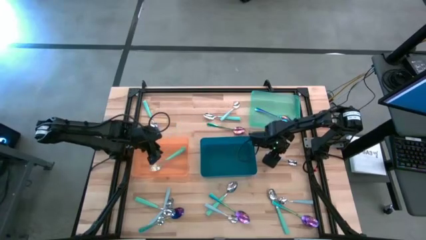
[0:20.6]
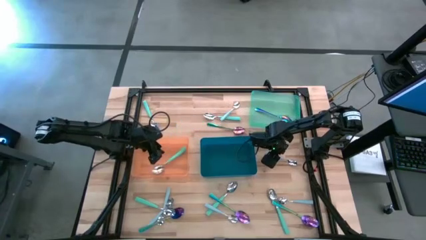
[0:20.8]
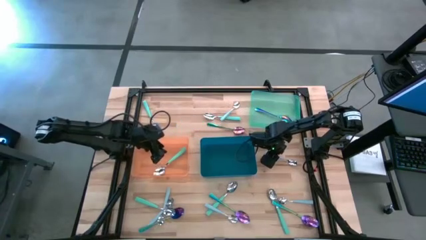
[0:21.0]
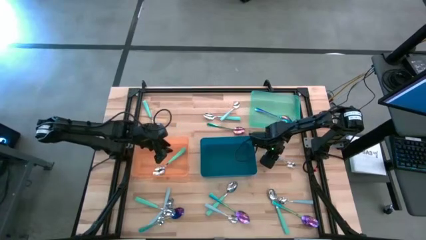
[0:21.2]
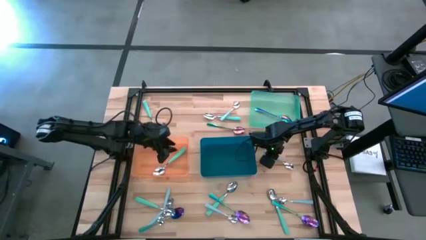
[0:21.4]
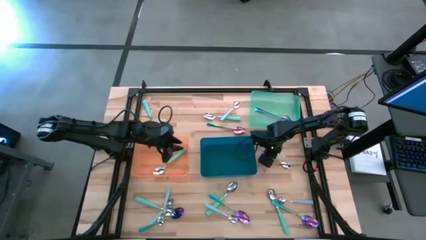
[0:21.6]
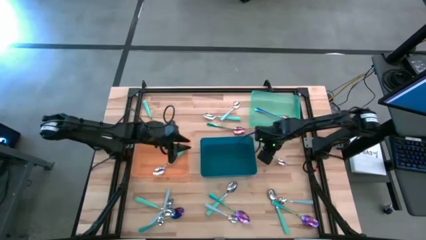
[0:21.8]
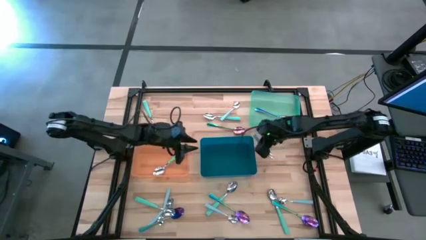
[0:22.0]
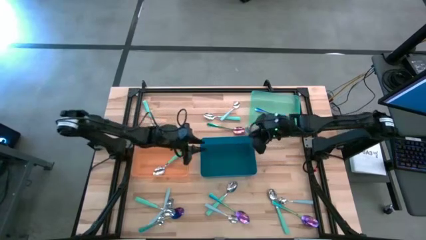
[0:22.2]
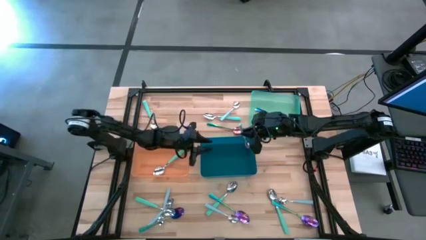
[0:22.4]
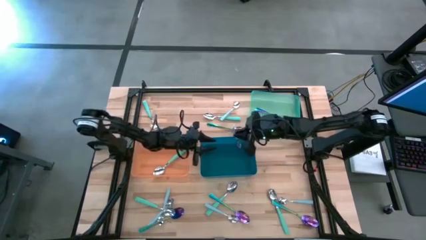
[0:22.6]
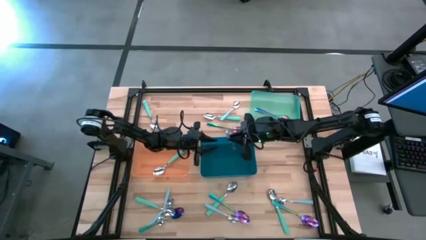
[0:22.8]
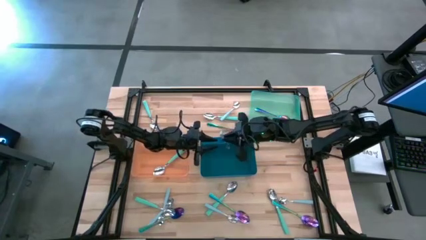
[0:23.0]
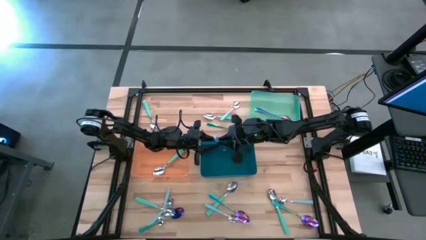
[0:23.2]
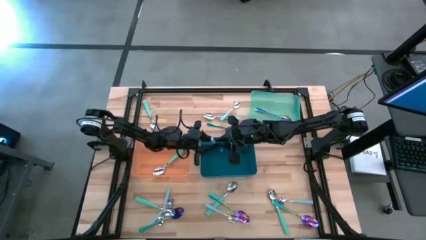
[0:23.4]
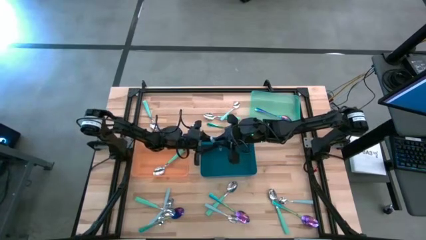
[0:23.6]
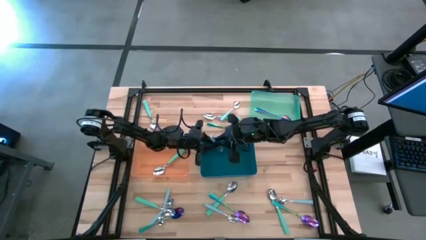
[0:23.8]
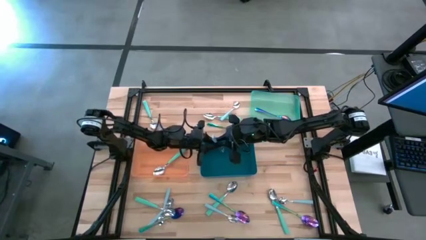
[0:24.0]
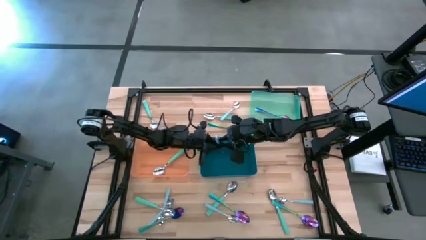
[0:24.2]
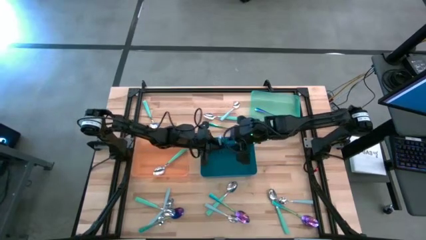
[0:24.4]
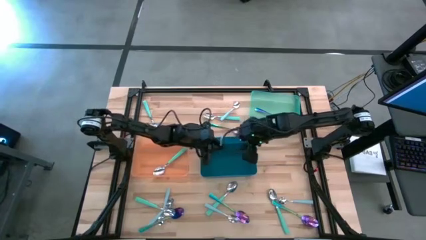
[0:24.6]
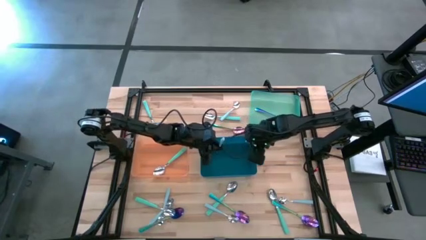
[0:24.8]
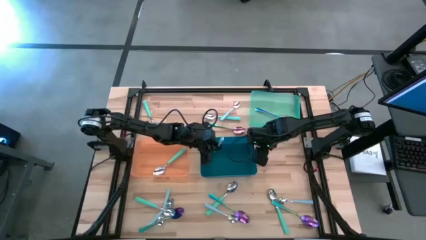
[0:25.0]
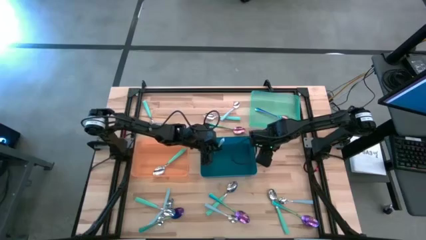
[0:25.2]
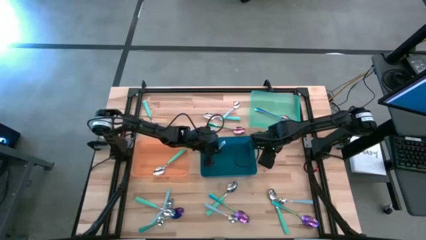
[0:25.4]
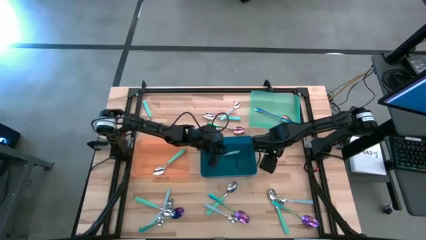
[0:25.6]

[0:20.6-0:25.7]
Task: Sort silverware by color (type)
Put the light blue spoon into the blue bin

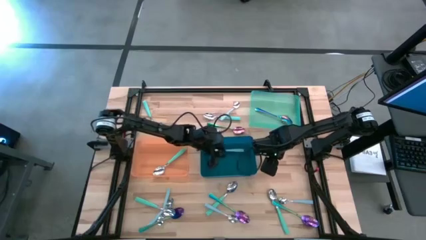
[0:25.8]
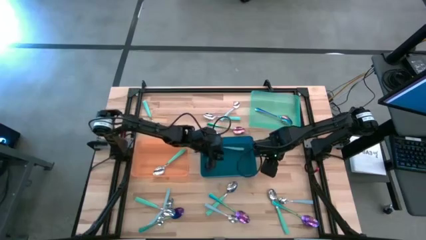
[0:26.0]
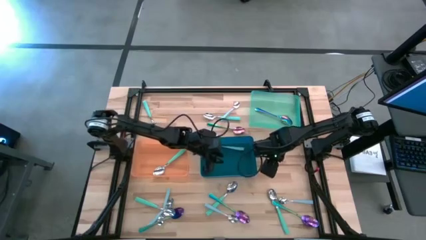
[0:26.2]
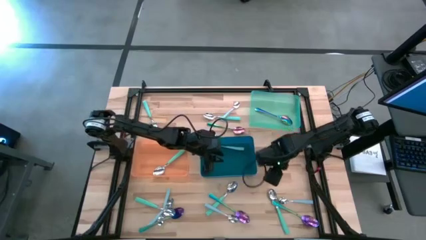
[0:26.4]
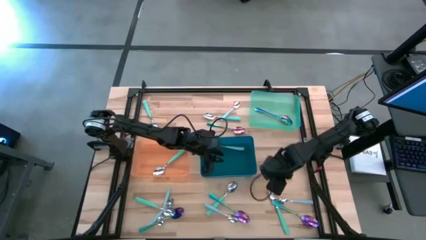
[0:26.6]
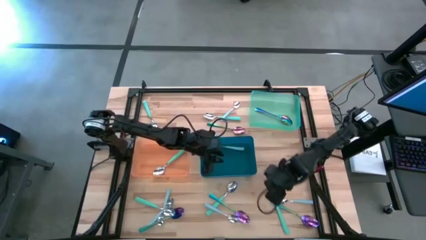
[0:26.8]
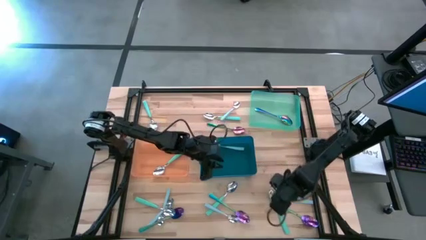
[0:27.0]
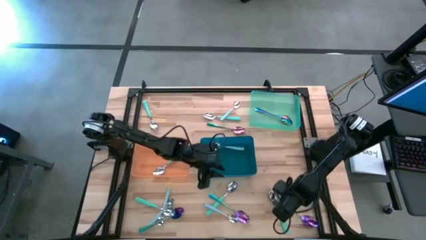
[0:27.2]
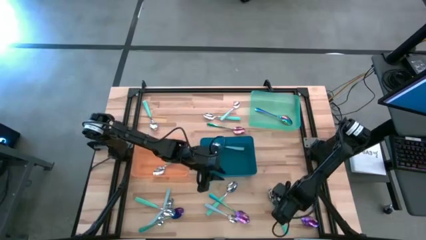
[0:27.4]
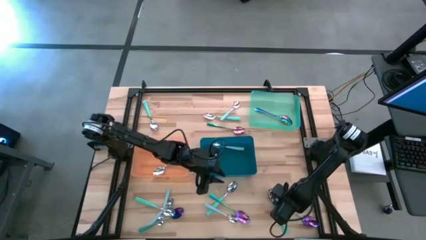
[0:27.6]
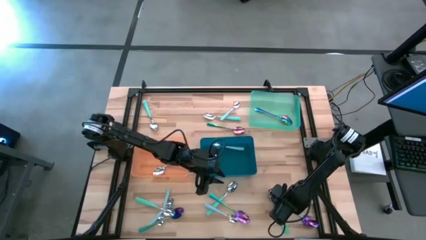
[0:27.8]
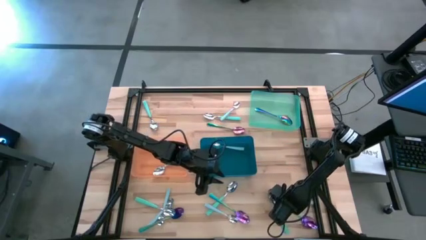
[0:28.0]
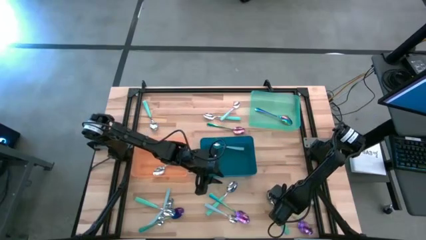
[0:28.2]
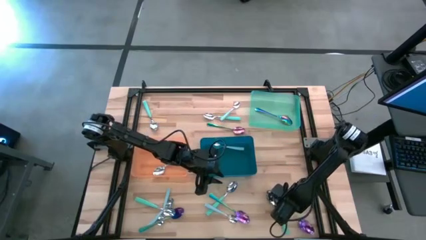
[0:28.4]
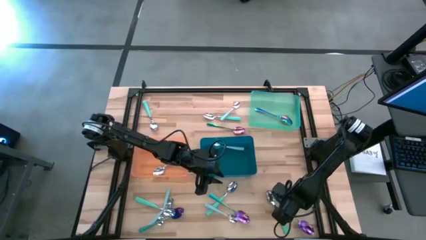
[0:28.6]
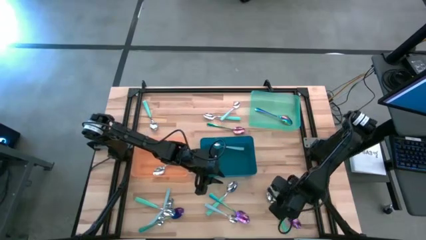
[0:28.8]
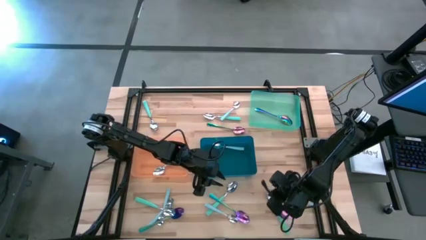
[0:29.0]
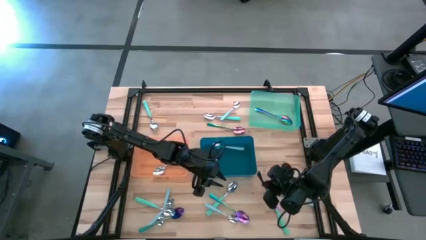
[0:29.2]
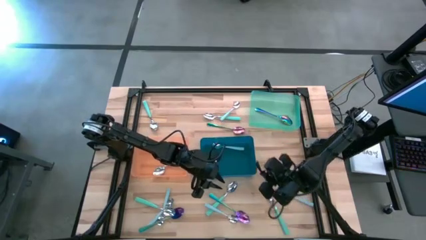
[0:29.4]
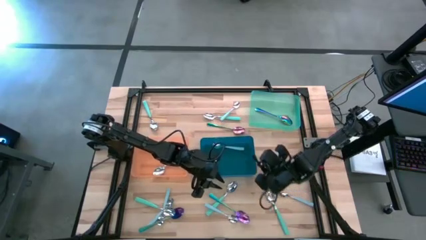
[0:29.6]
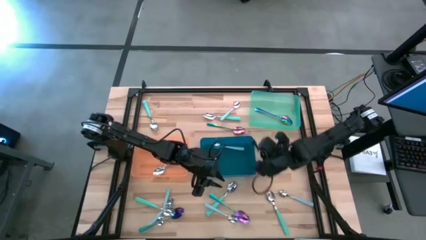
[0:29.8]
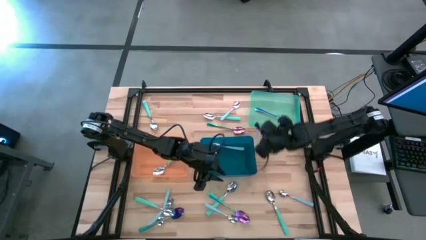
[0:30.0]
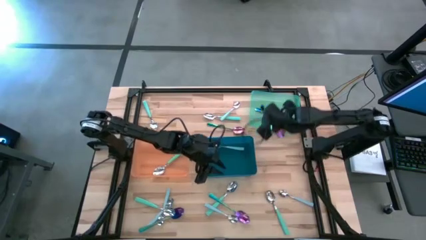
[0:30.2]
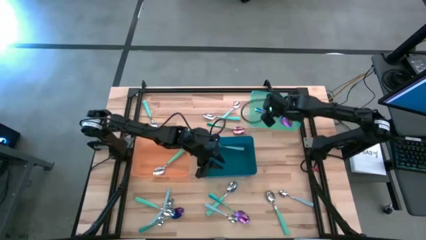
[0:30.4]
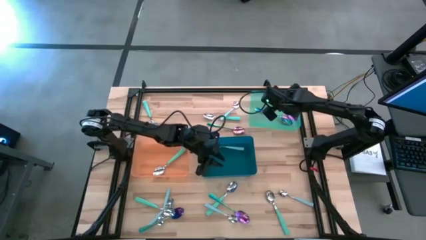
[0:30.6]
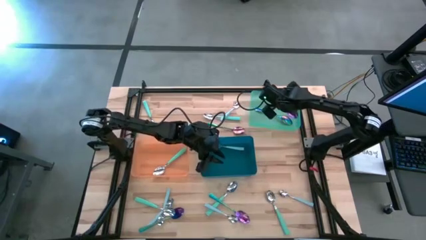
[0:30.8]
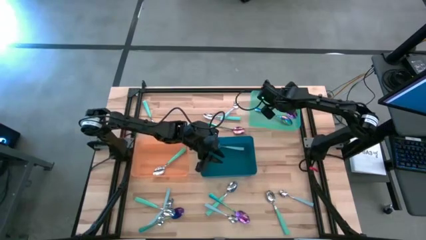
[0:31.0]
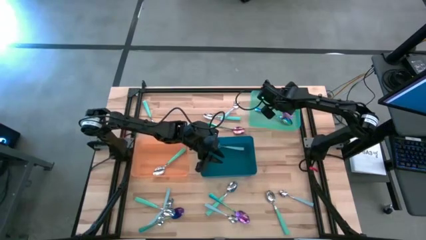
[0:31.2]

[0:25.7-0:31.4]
Put the blue spoon into the green bin

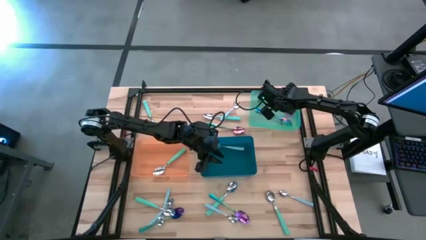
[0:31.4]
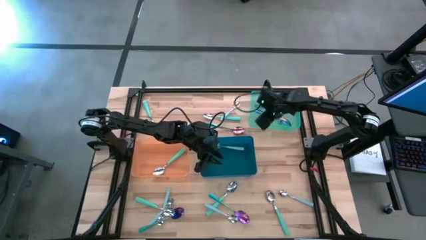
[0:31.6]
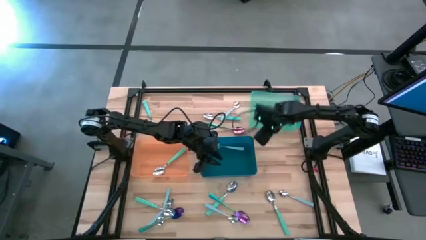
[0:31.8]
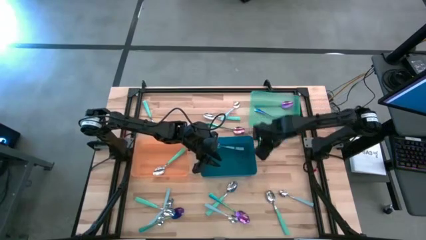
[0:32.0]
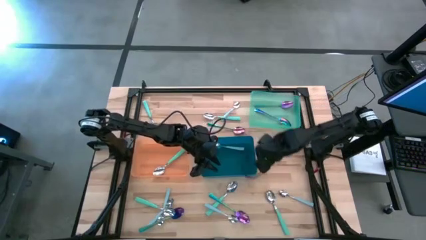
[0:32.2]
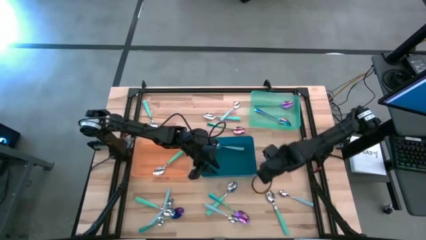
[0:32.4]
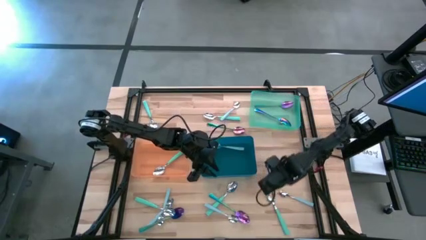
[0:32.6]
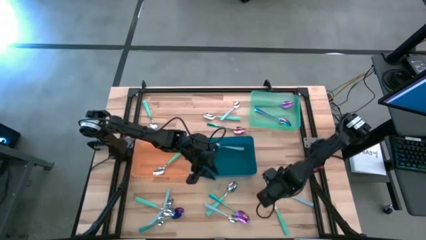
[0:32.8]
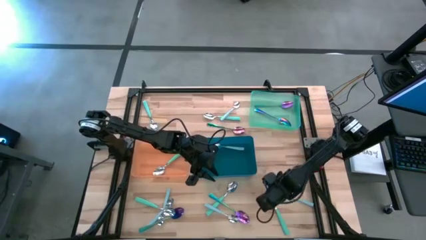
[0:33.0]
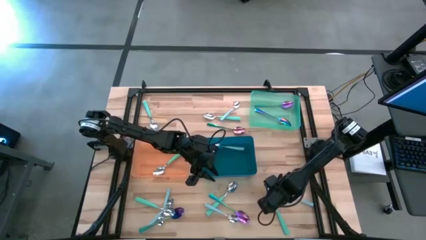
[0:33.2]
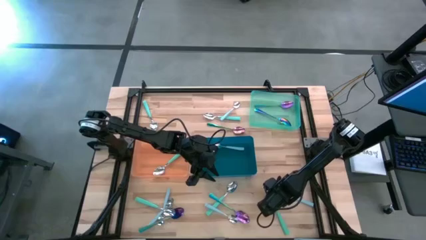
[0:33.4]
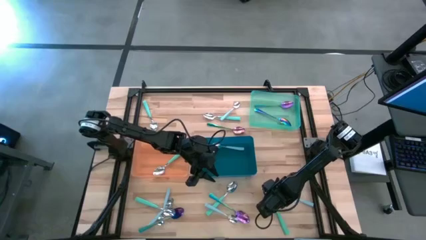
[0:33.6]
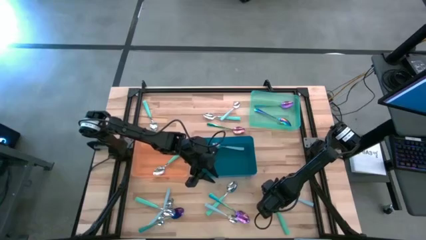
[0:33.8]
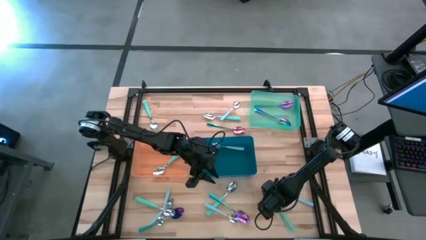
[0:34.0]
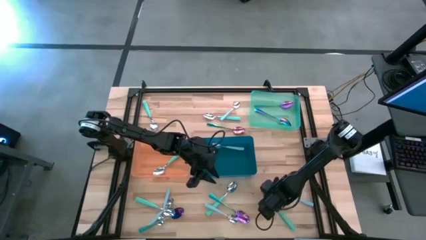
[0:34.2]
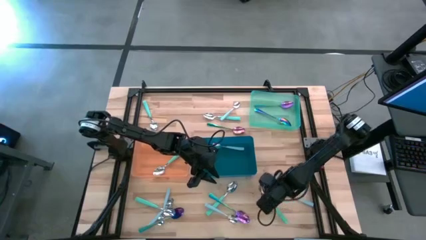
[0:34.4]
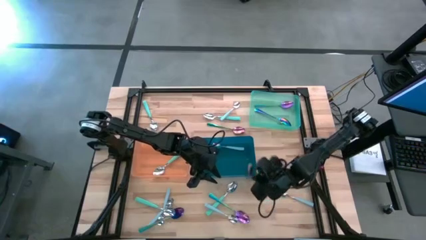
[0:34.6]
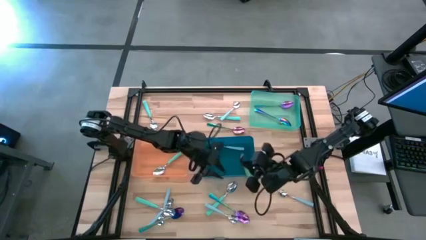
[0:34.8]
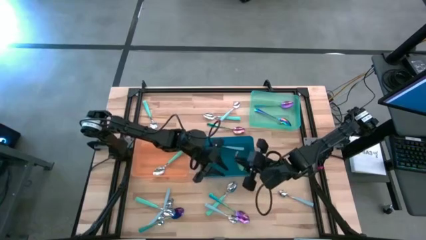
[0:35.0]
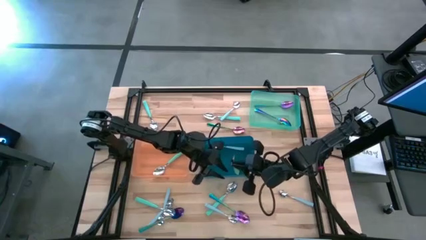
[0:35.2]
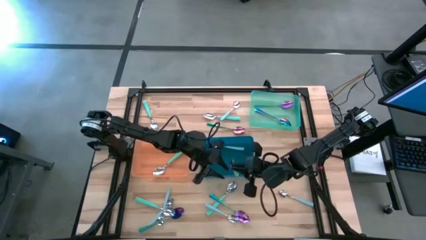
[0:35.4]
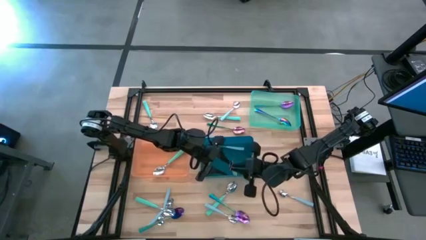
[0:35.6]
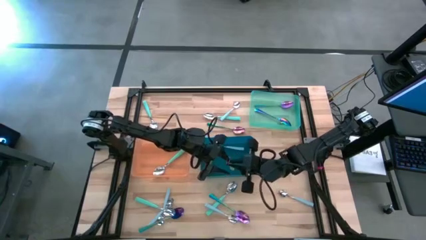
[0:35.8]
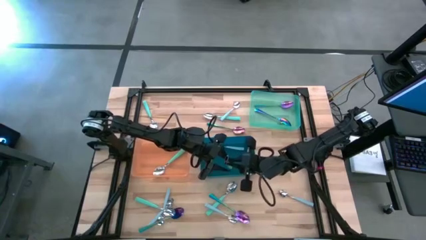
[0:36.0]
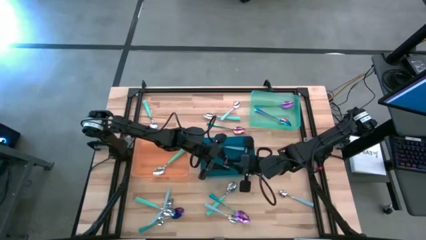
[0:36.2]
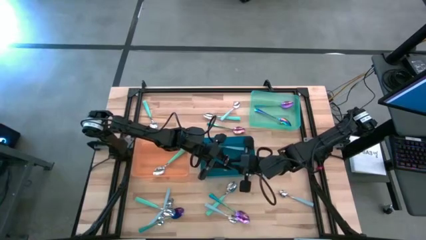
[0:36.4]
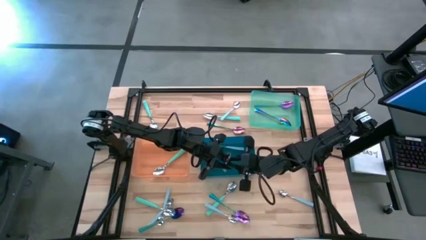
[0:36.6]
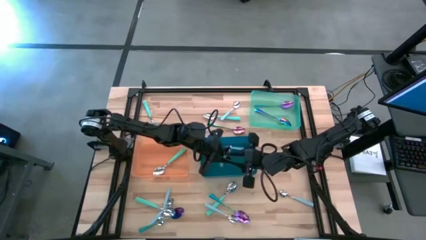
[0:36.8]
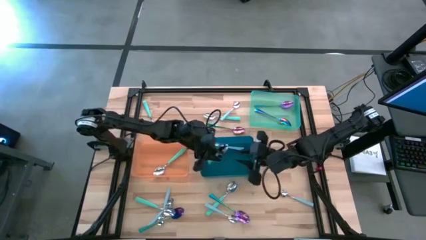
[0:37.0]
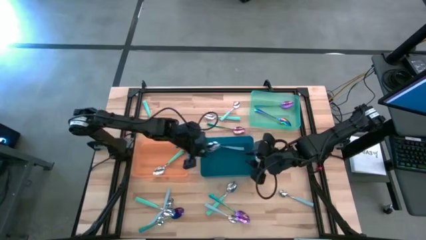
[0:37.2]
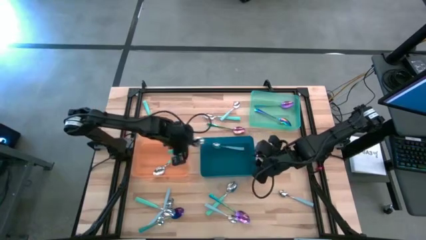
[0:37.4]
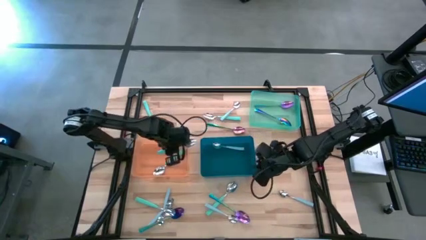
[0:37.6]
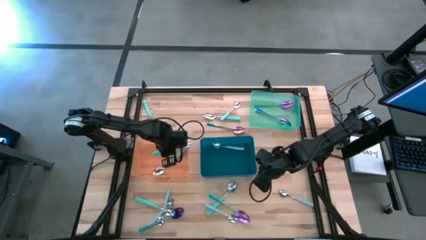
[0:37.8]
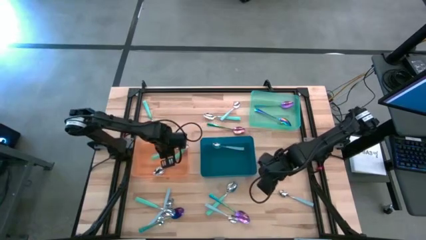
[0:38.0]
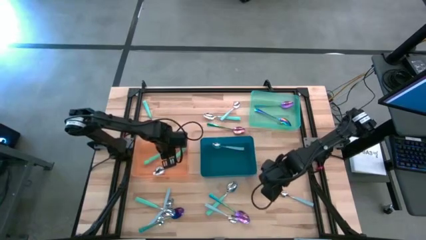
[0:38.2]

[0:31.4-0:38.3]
Put the light green spoon into the orange bin
